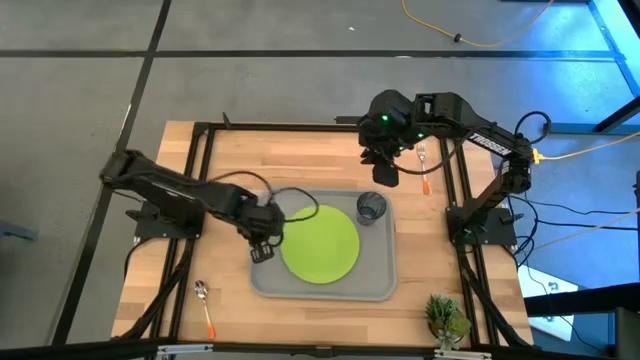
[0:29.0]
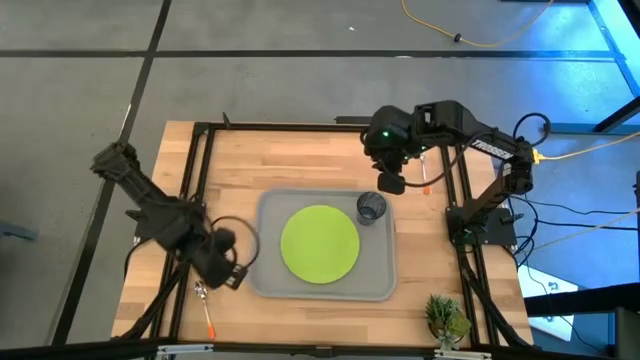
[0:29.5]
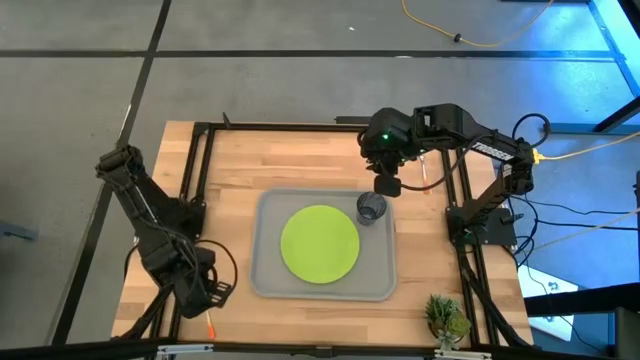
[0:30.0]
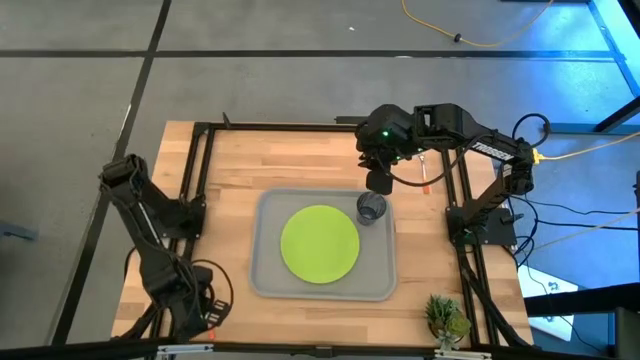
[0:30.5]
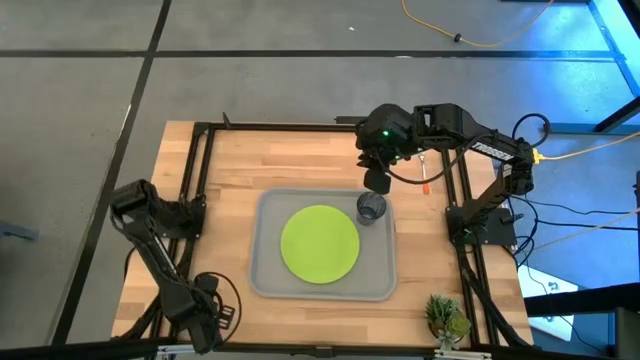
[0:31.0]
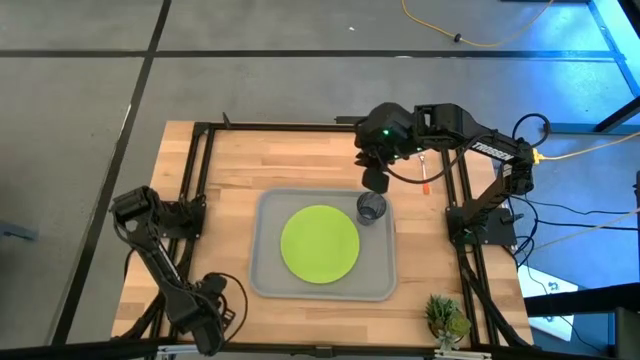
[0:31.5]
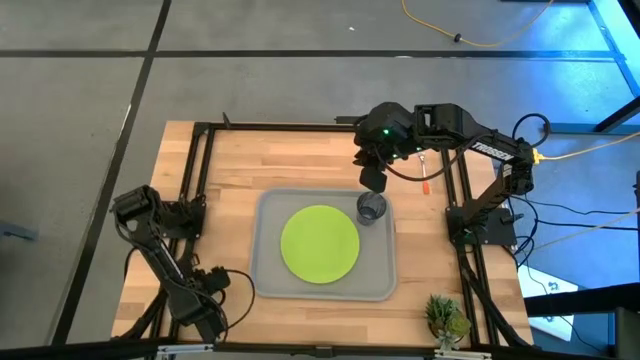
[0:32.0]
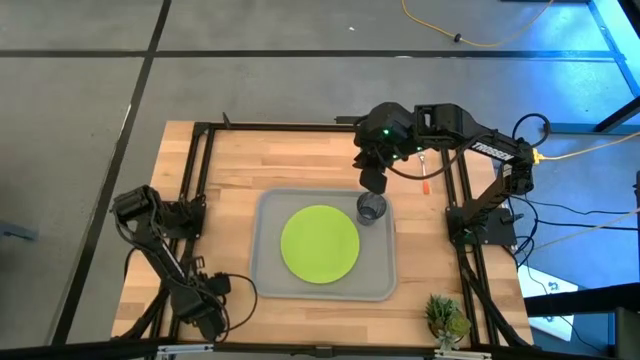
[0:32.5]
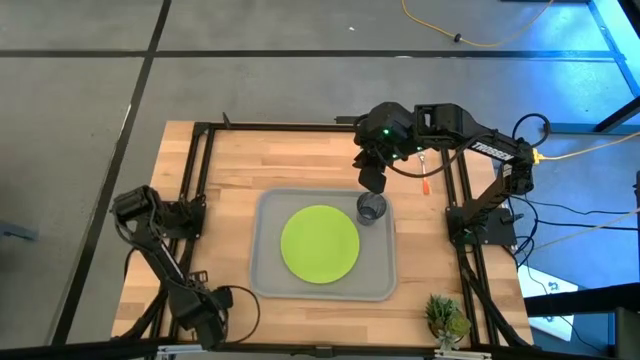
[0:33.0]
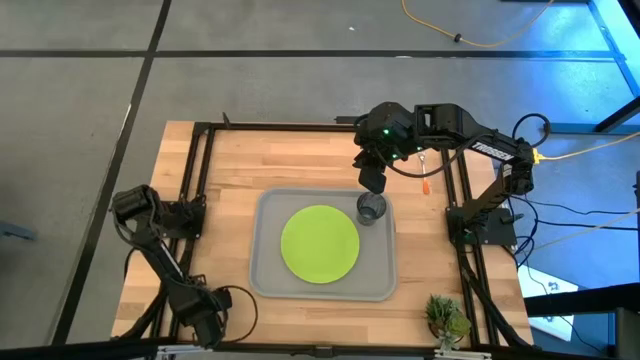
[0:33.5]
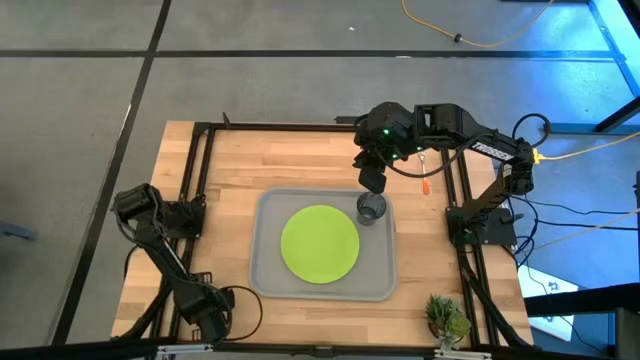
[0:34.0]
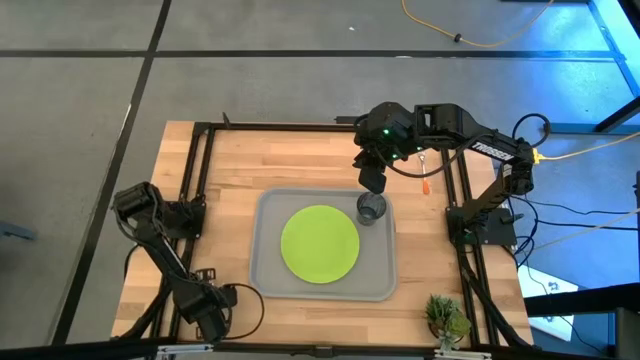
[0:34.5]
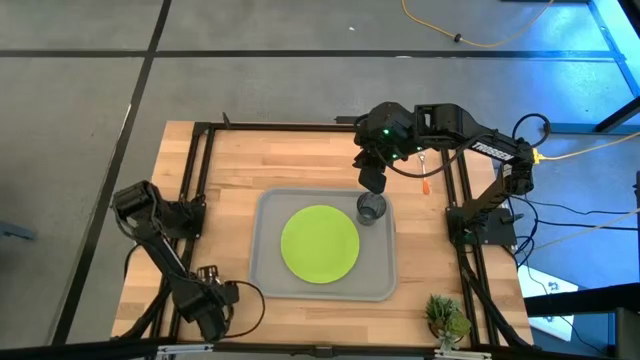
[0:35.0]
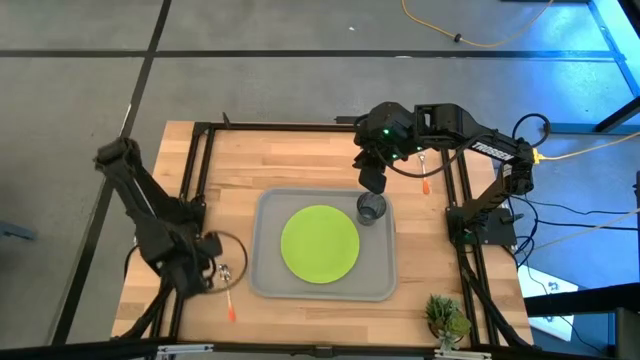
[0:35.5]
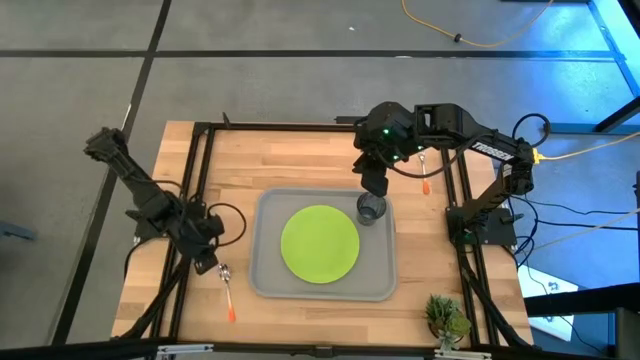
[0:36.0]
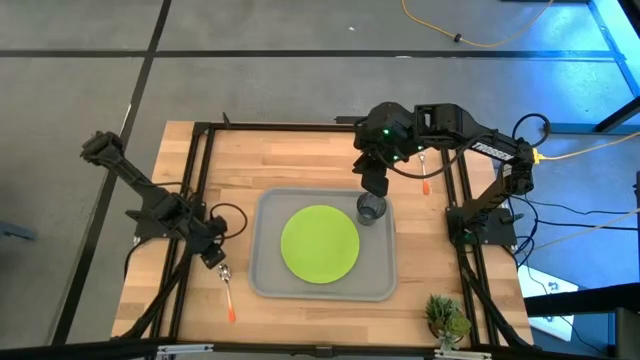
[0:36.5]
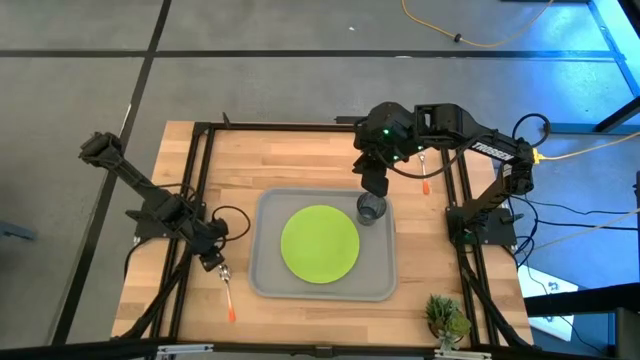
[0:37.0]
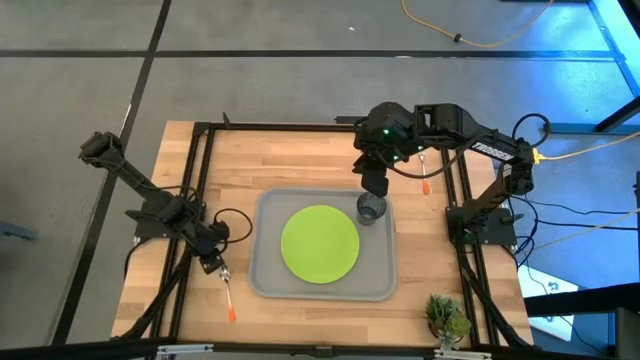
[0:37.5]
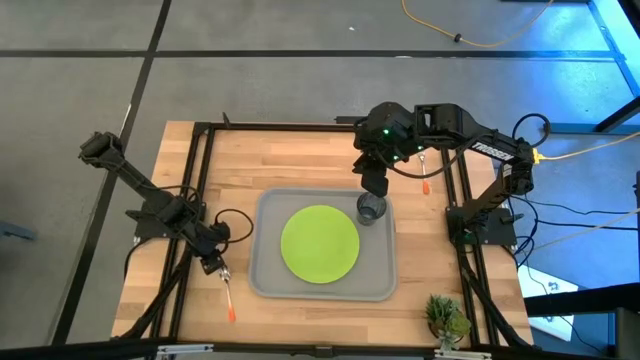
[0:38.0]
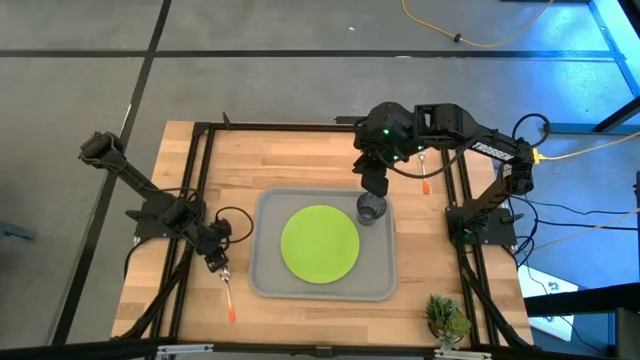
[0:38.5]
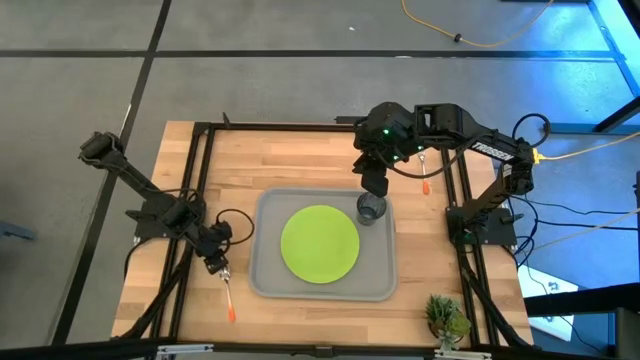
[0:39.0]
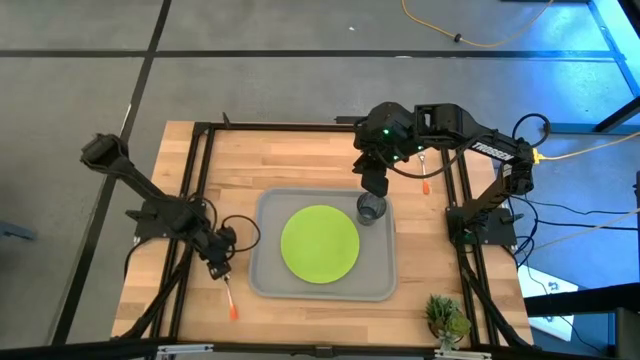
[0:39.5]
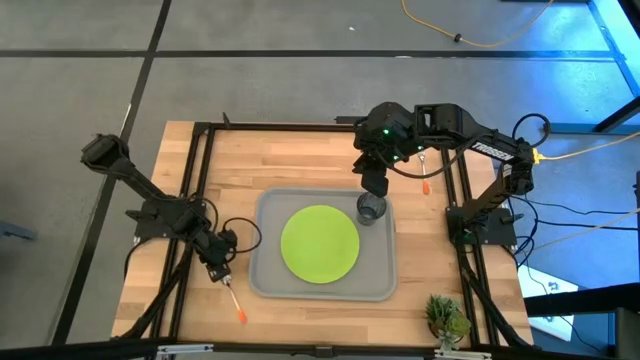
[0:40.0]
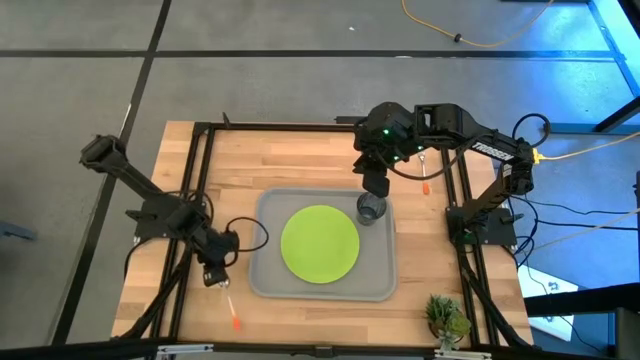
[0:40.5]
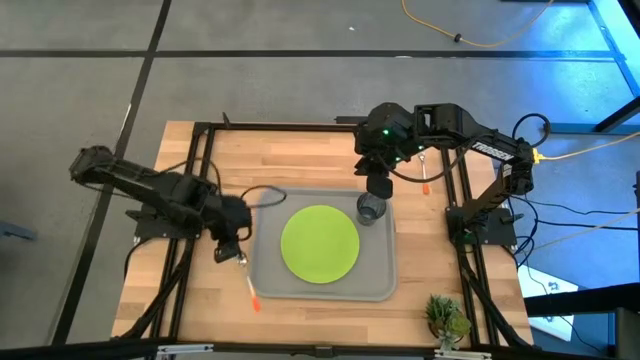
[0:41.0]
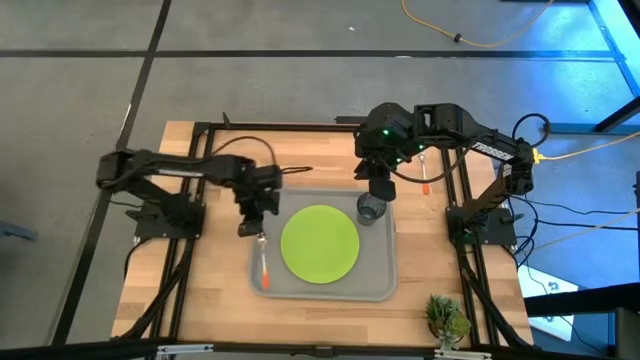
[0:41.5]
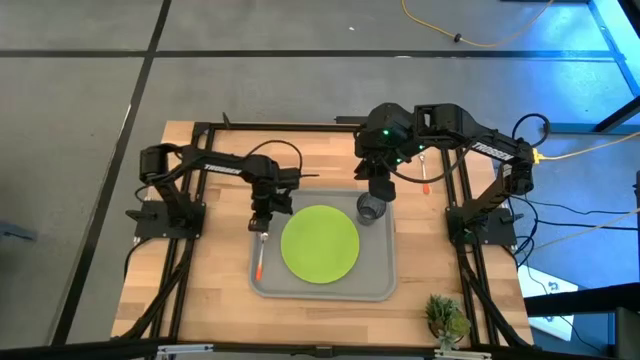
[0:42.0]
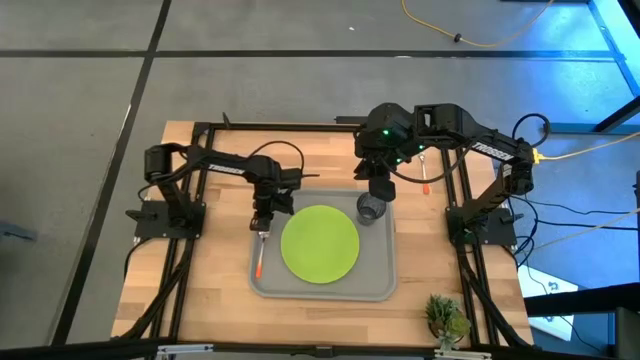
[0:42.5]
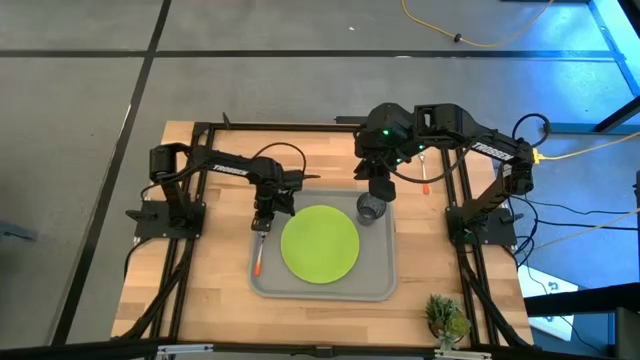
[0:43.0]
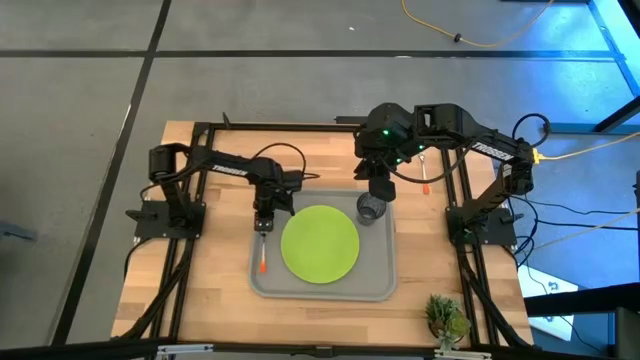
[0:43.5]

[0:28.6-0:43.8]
Task: Pick and place plate/cup/fork/spoon on tray
Put the orange spoon on the gray tray to the left of the green plate

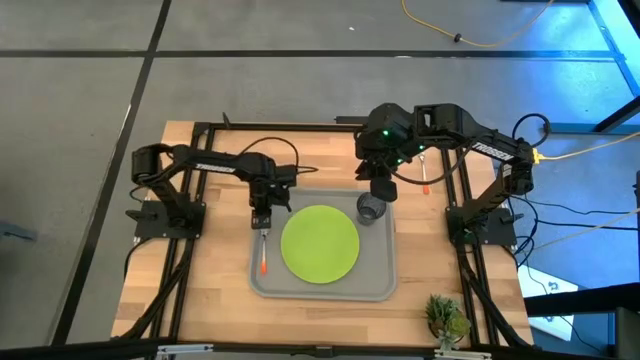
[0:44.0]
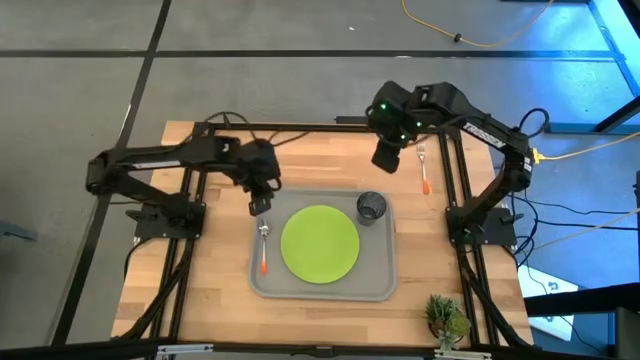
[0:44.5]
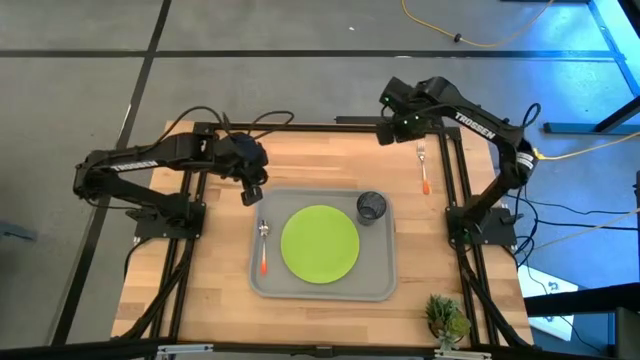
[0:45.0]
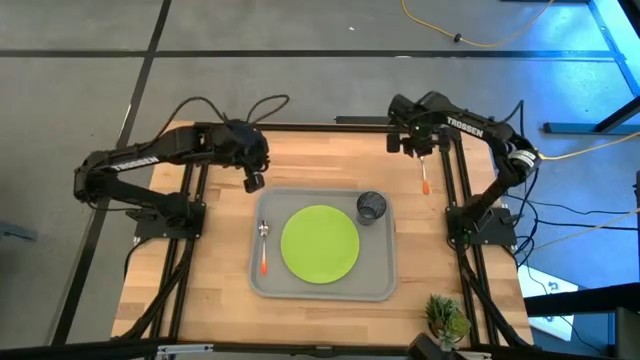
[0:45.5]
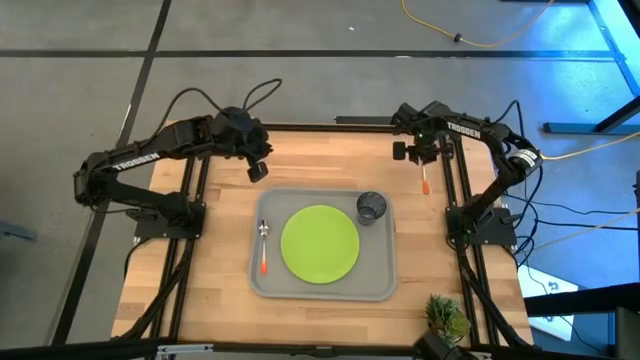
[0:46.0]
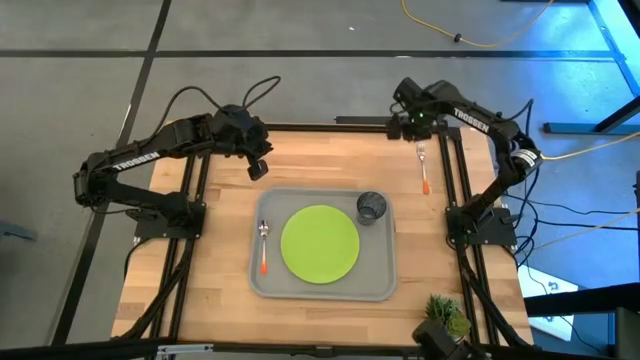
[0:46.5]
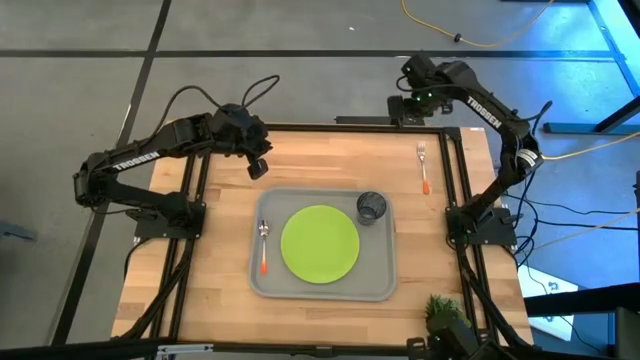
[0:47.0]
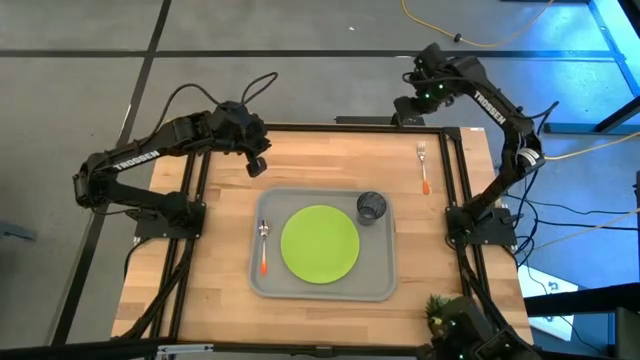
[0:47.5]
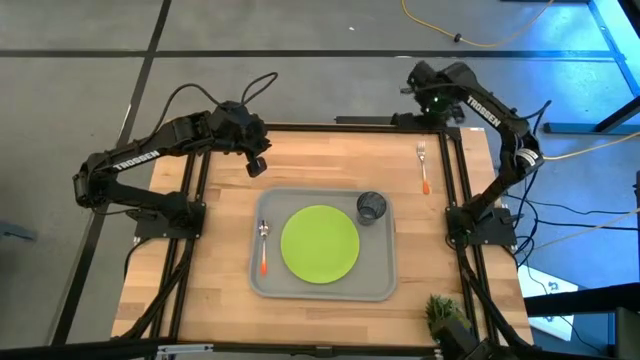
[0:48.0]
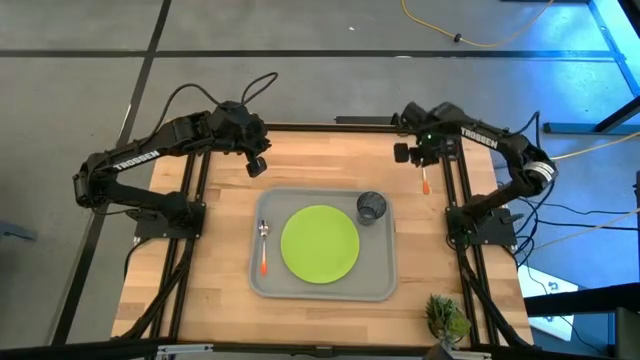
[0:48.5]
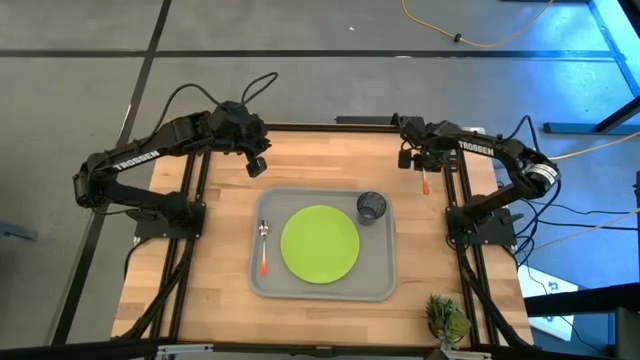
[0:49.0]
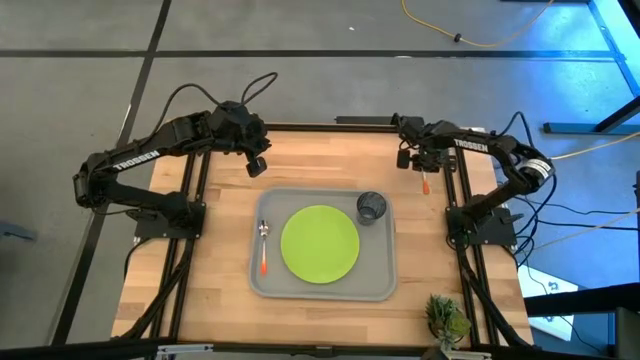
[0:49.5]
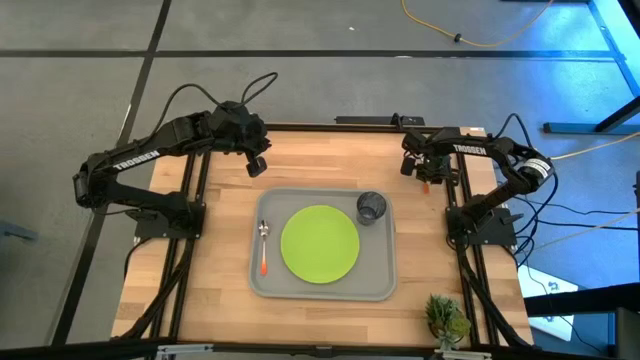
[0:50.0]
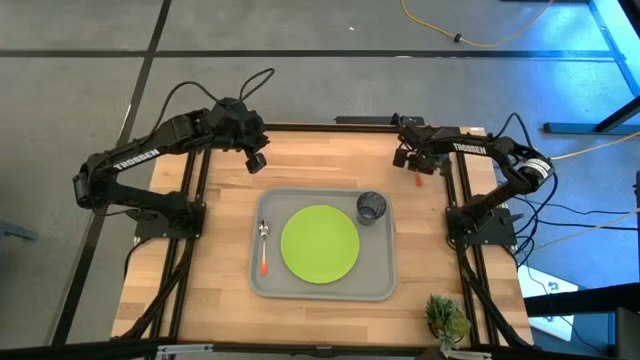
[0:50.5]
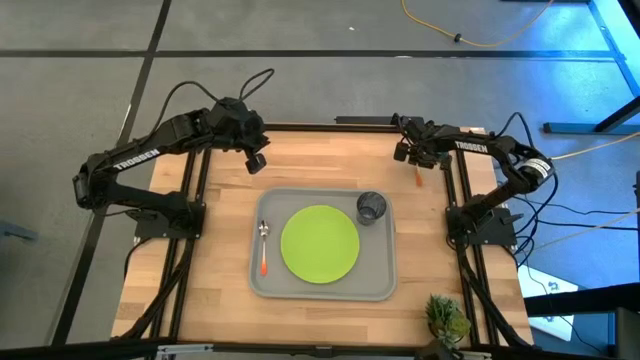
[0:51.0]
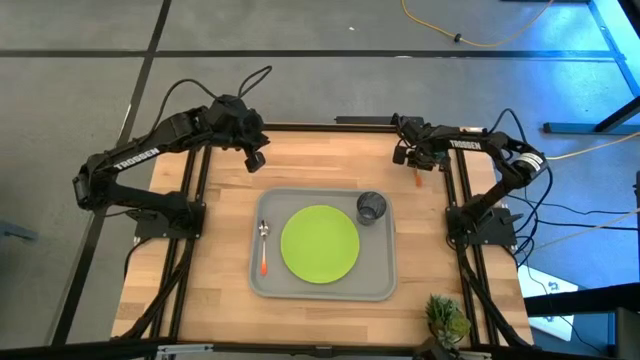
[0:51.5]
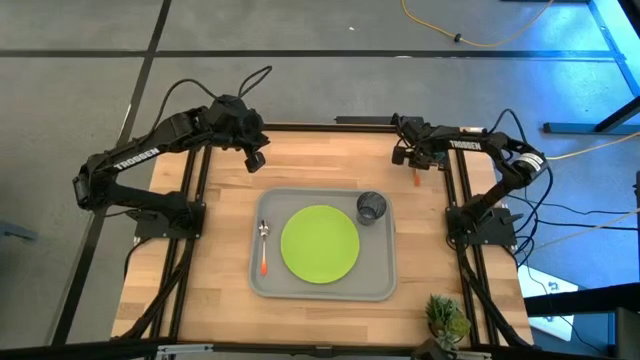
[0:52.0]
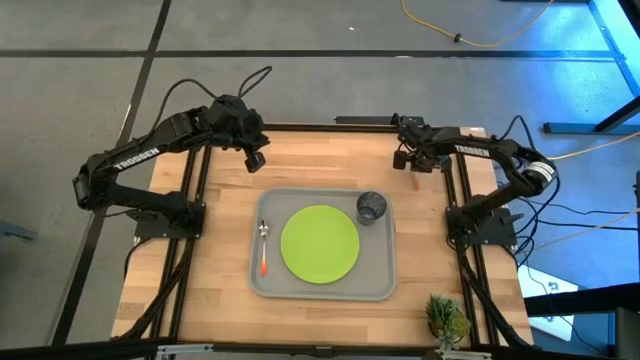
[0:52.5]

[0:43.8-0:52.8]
Put the fork on the gray tray between the green plate and orange spoon
